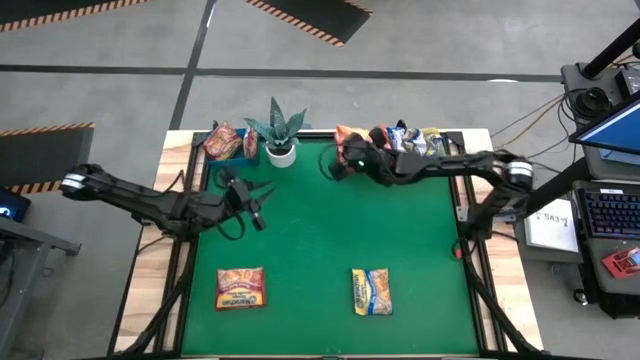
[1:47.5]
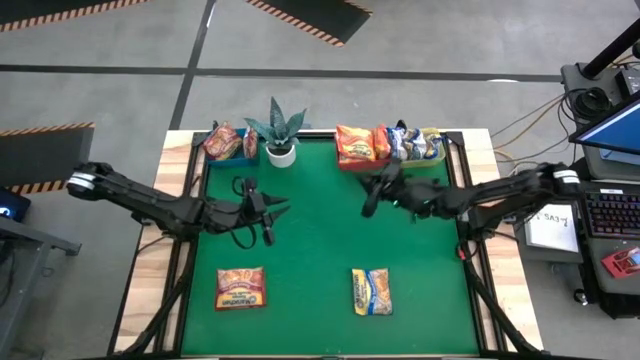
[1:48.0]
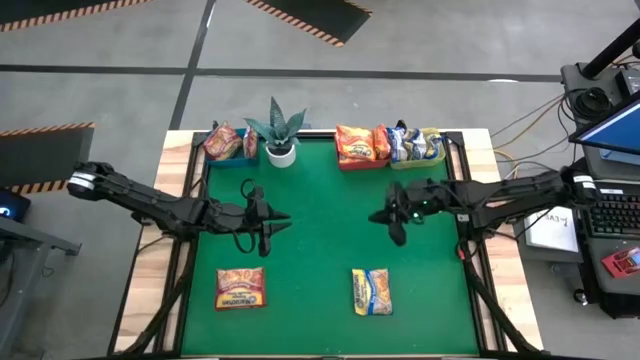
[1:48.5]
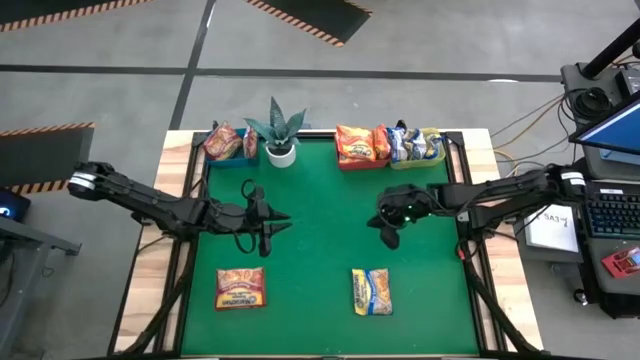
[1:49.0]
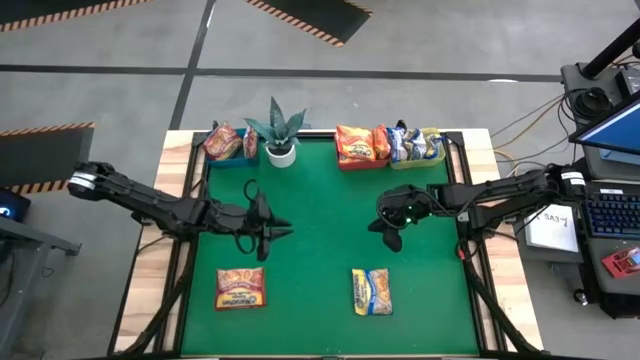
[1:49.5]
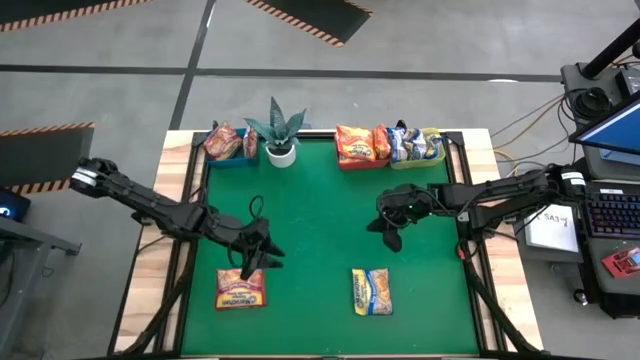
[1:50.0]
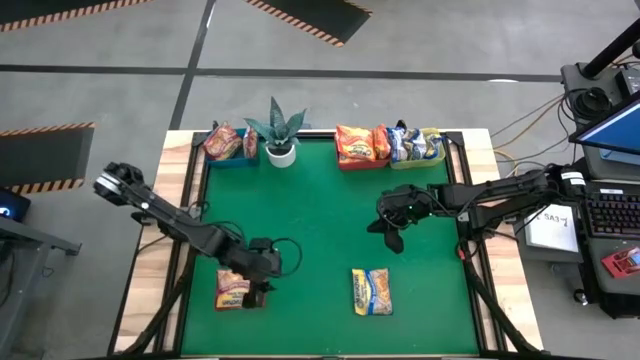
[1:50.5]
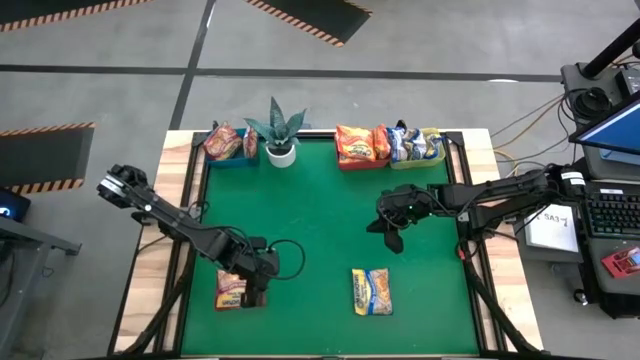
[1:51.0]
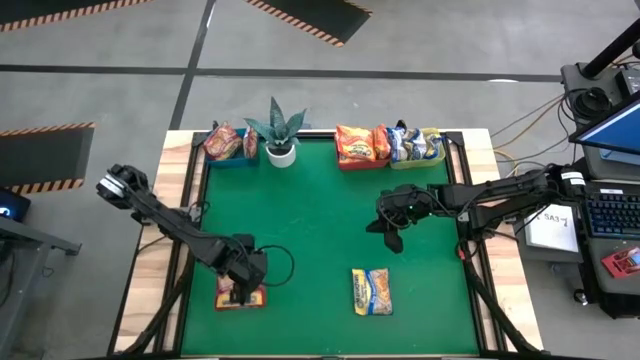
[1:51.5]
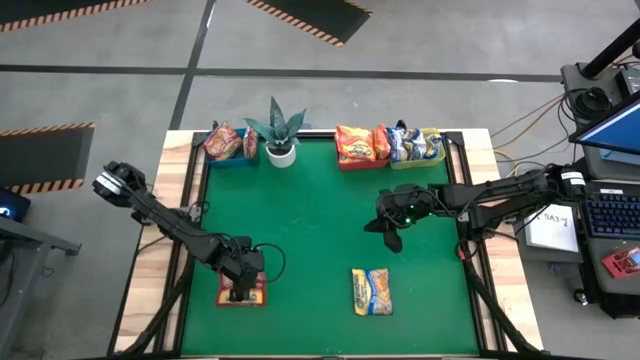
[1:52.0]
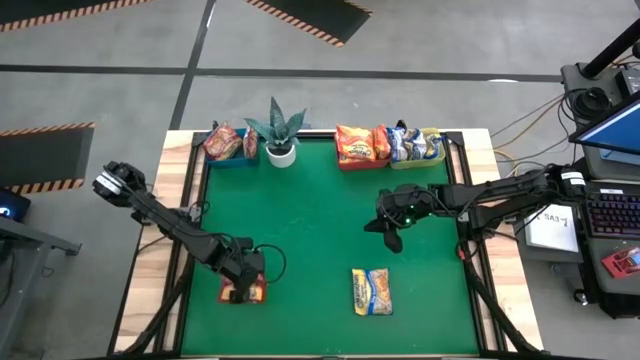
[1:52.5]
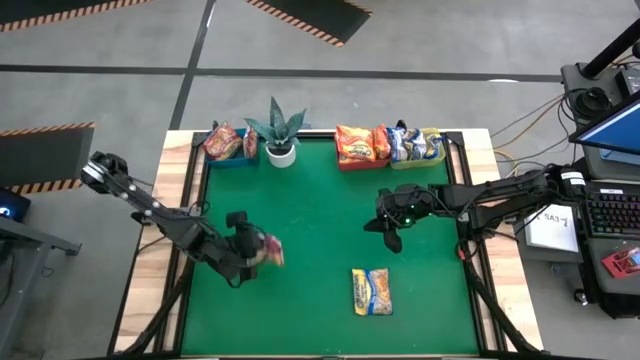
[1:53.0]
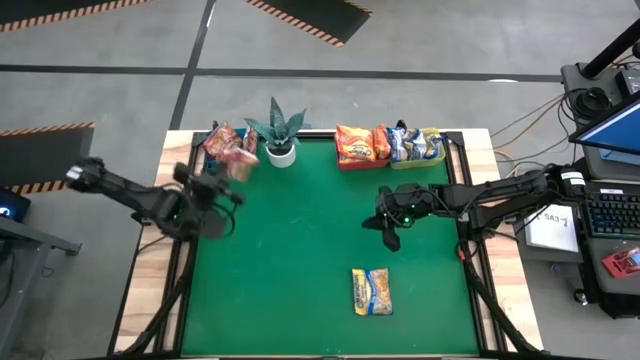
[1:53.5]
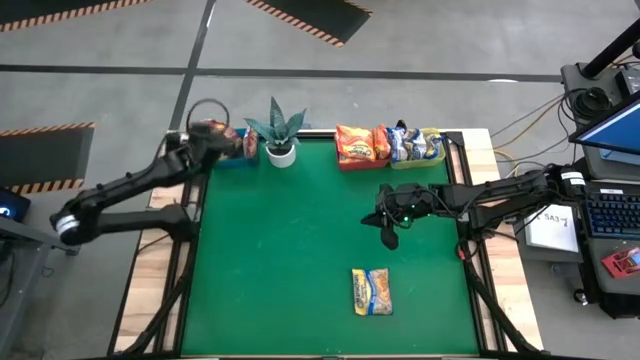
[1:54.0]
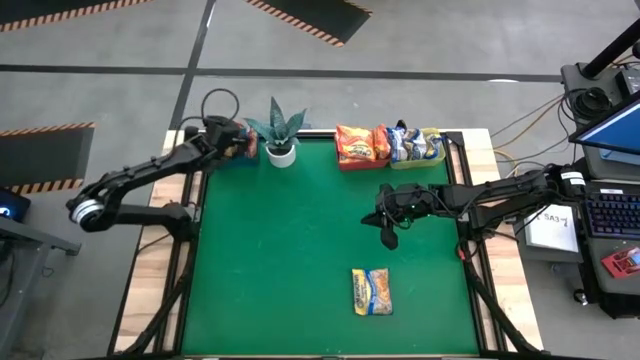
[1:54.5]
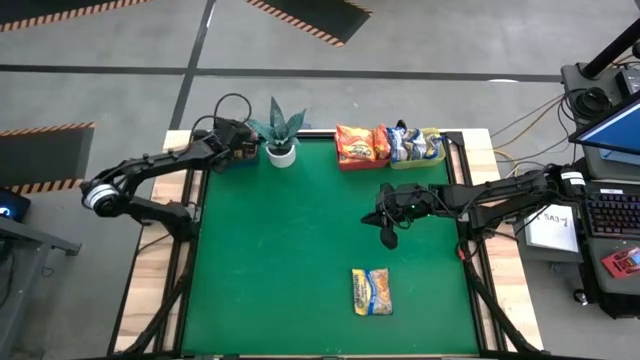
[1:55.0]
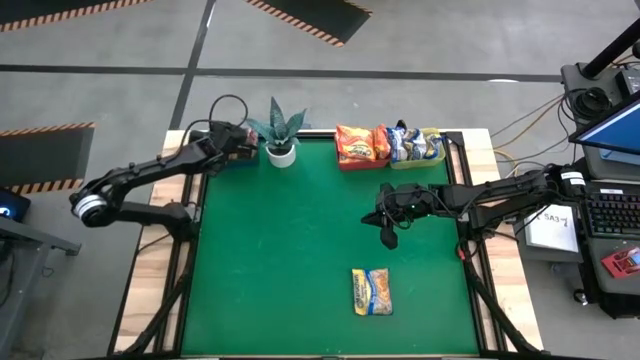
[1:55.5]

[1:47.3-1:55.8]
Task: Sort Maruchan noodles
Put the red noodle pack into the blue bin

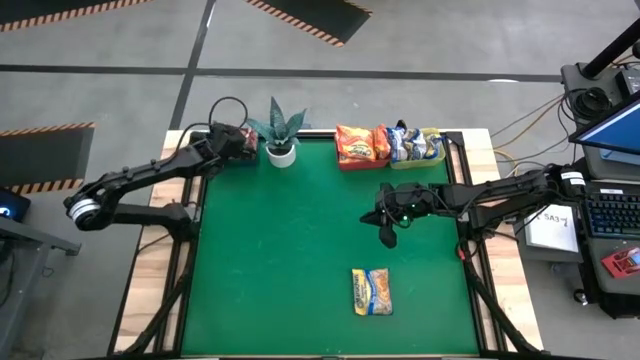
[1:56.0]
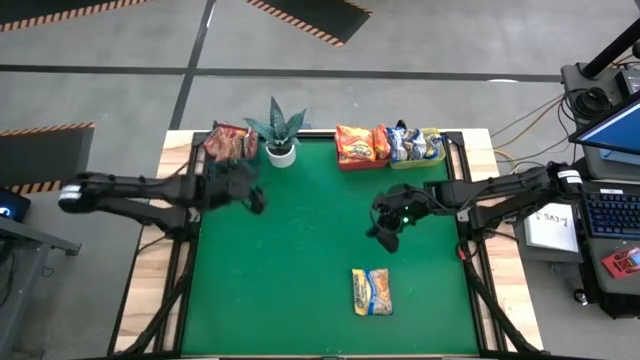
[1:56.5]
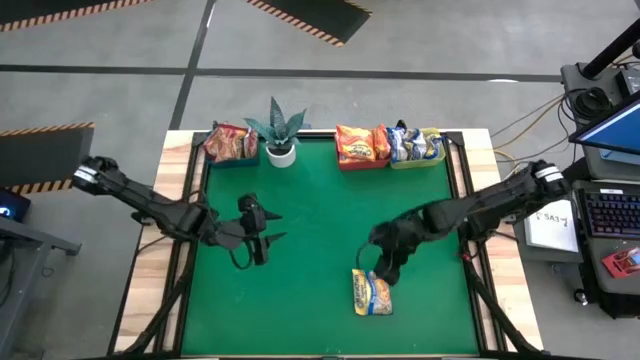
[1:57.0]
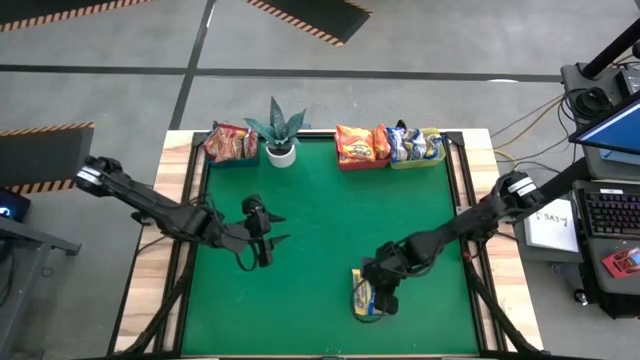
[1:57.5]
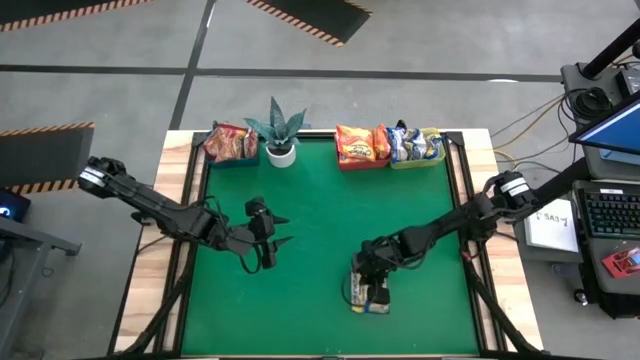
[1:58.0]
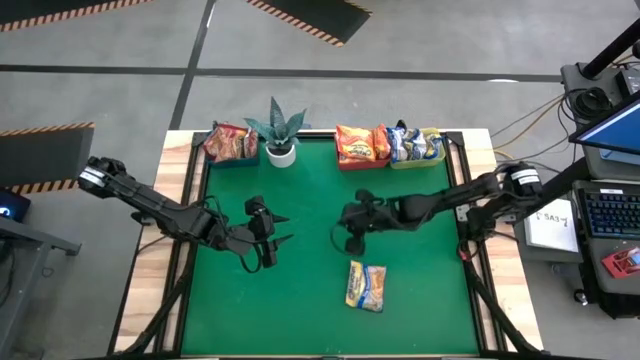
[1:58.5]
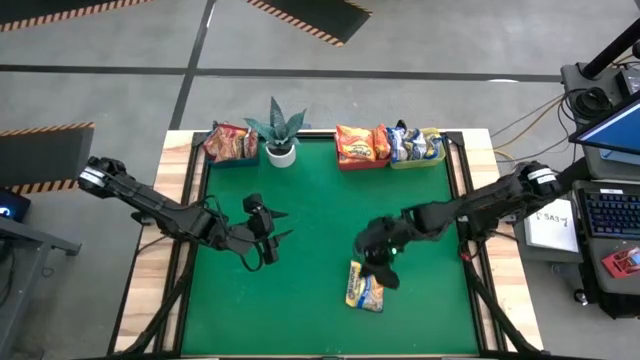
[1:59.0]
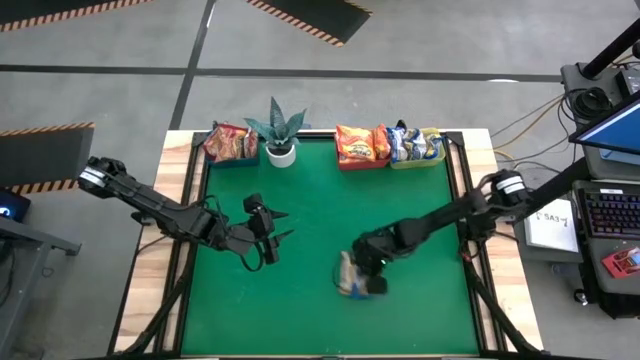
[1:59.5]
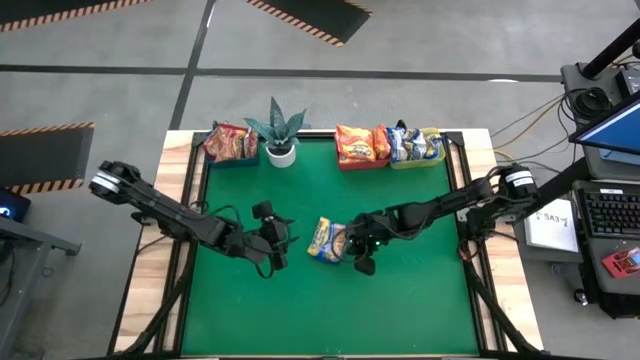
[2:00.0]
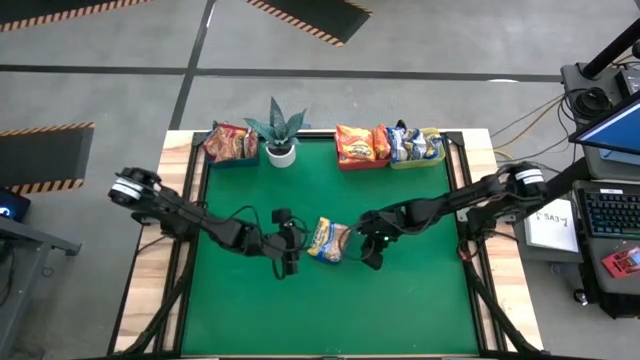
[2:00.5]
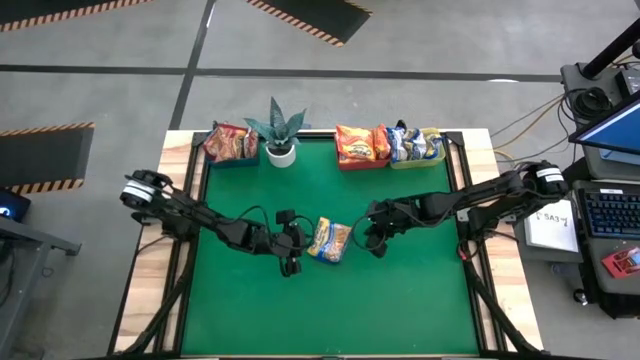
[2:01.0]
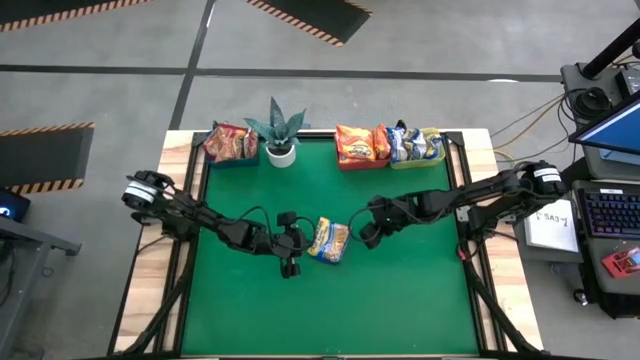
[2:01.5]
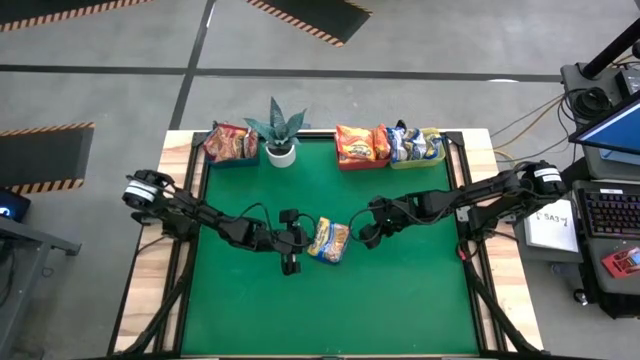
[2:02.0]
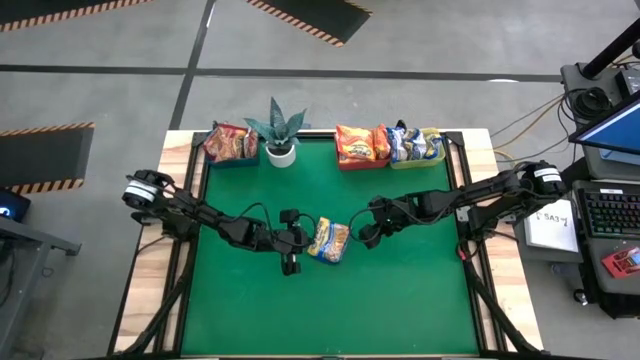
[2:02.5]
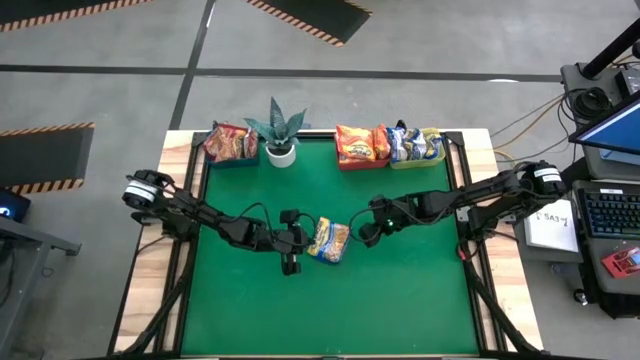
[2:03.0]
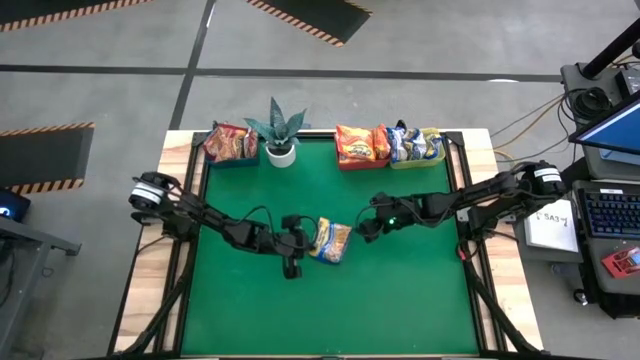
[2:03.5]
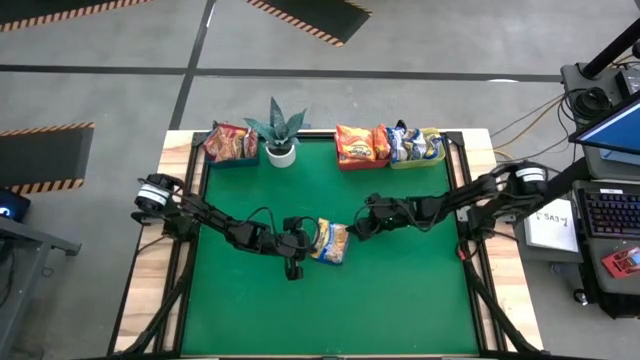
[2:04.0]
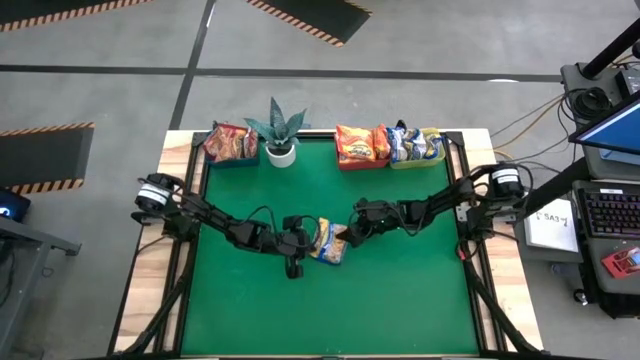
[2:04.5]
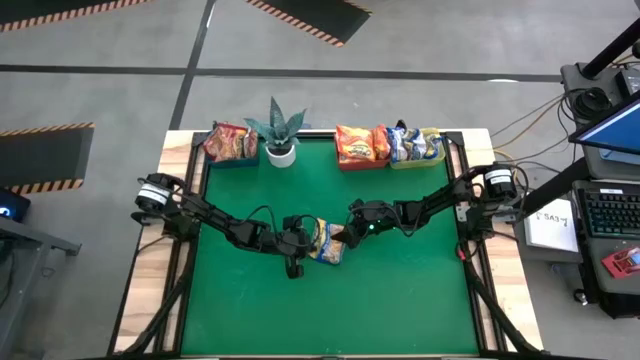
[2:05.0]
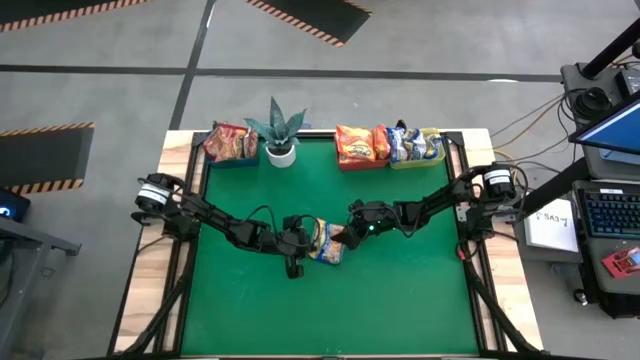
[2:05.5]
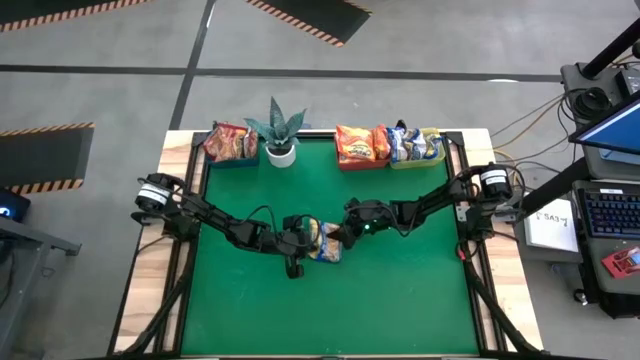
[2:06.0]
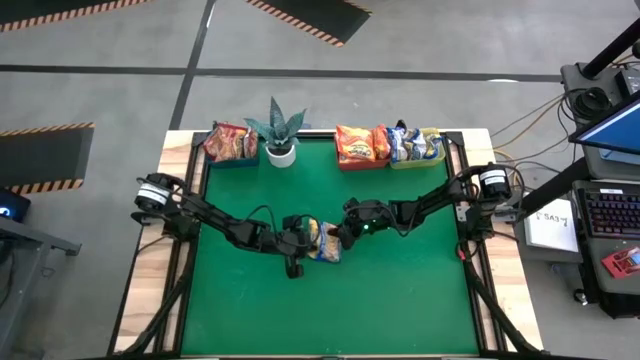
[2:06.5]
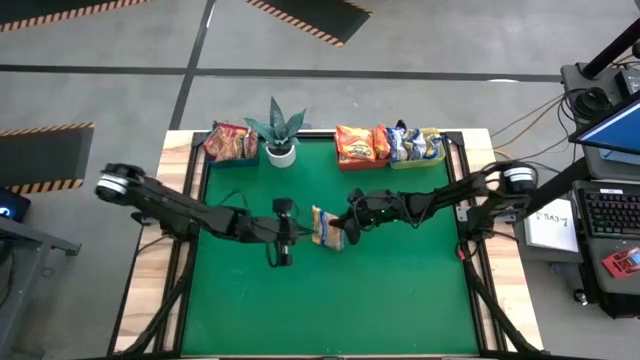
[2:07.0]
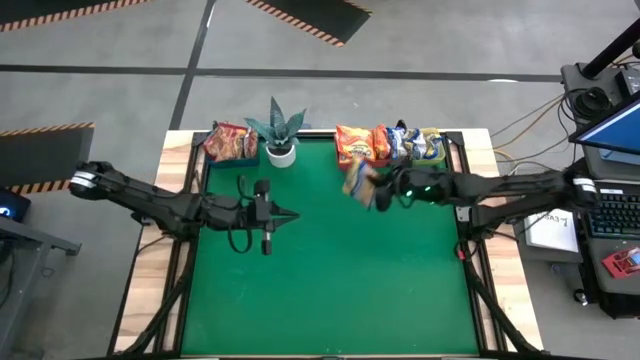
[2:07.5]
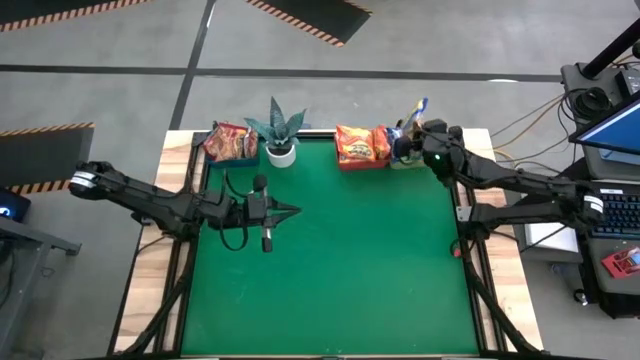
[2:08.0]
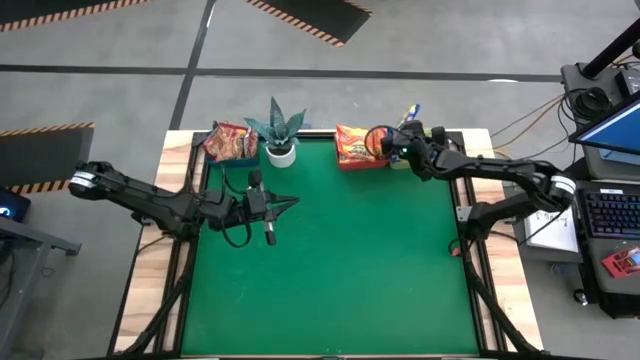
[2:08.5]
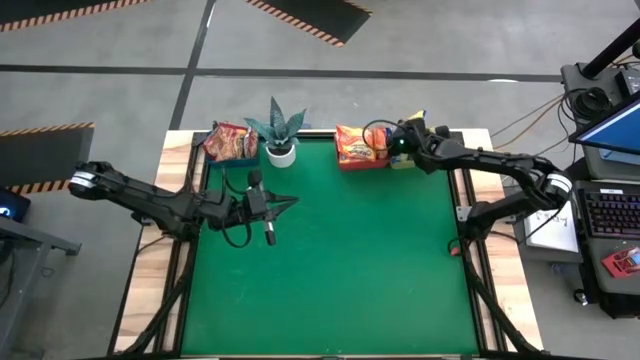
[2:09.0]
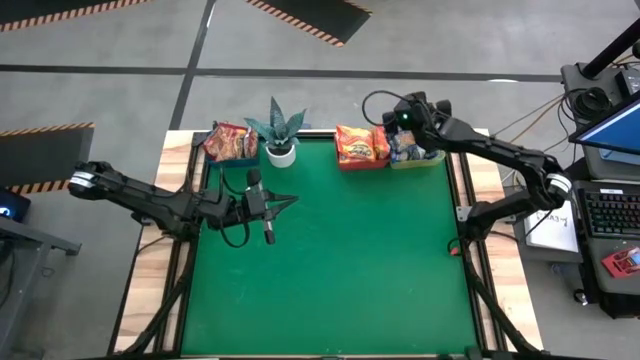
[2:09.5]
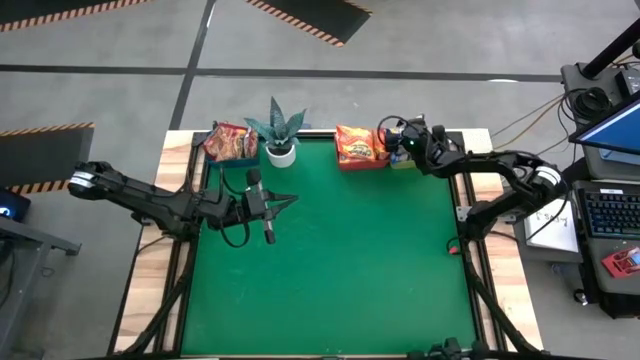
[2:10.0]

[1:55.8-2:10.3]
Put the blue noodle pack into the yellow bin
